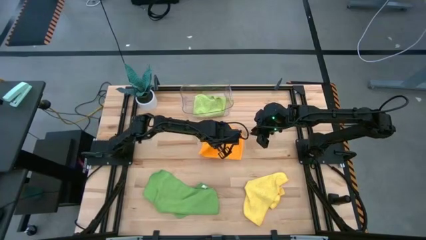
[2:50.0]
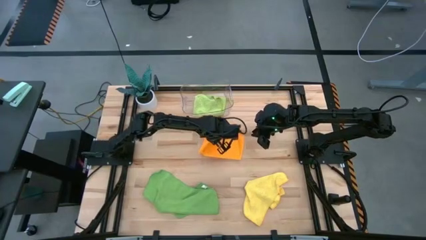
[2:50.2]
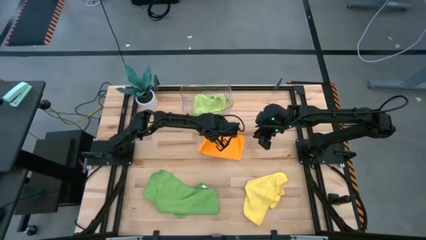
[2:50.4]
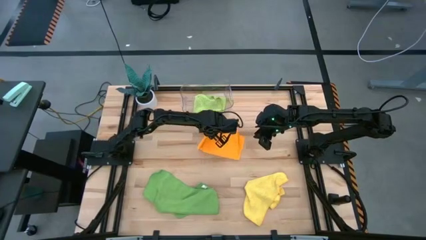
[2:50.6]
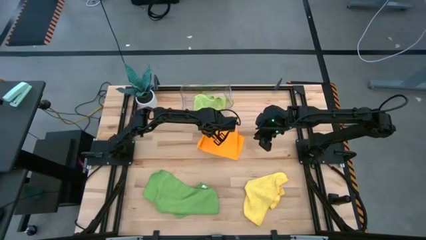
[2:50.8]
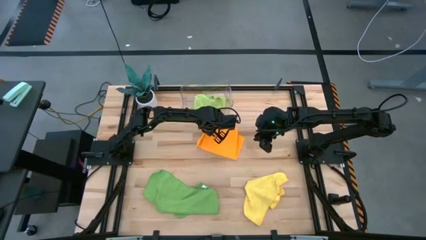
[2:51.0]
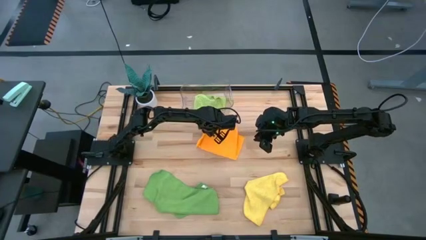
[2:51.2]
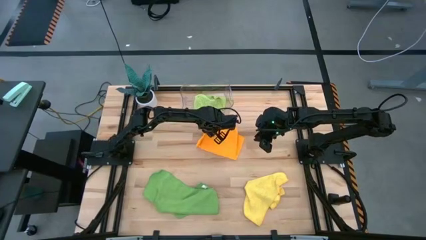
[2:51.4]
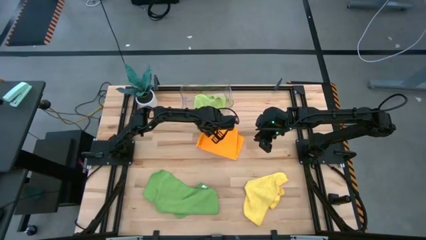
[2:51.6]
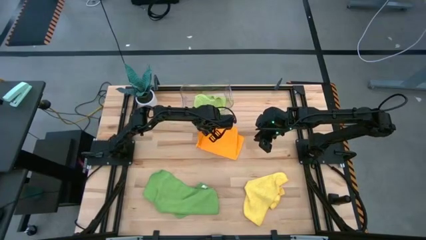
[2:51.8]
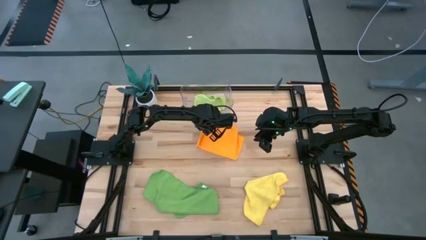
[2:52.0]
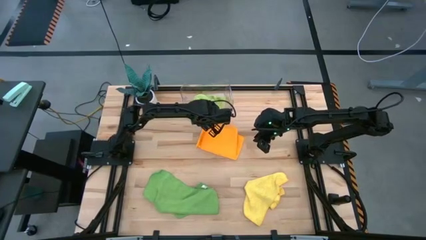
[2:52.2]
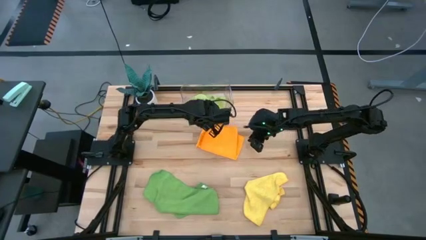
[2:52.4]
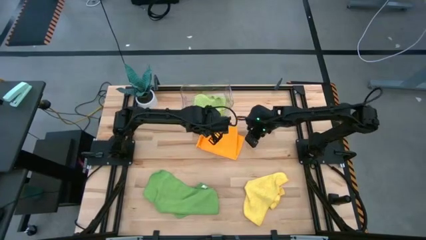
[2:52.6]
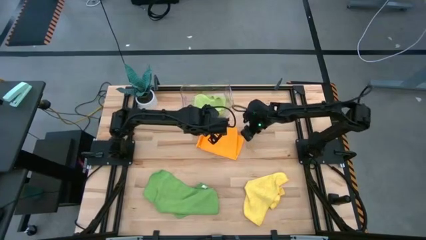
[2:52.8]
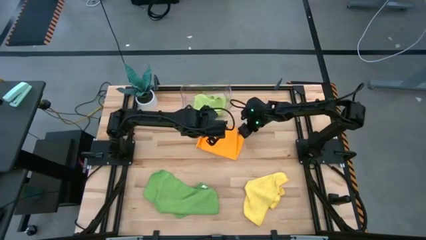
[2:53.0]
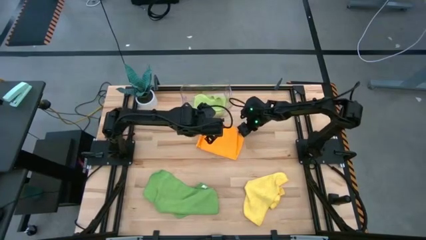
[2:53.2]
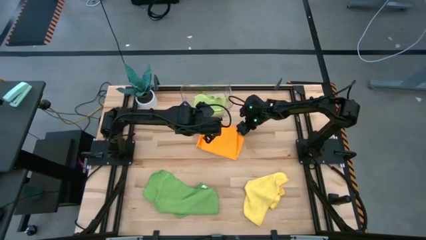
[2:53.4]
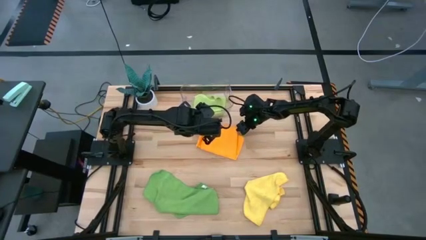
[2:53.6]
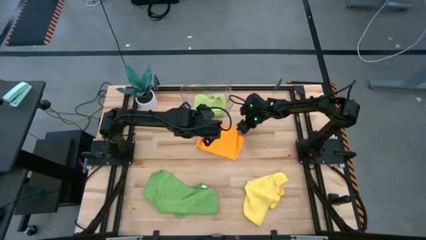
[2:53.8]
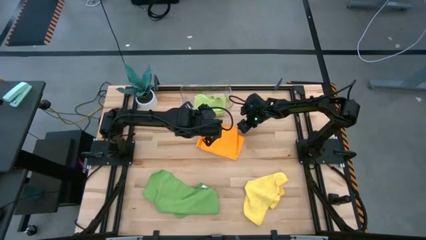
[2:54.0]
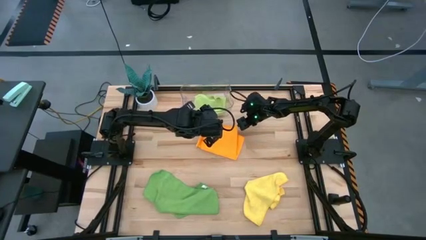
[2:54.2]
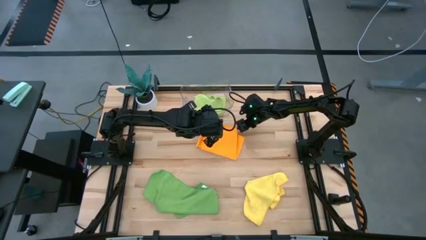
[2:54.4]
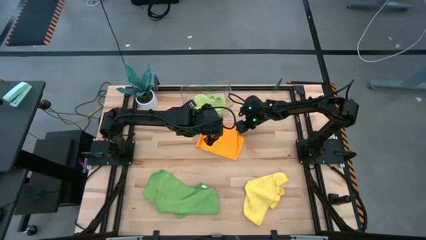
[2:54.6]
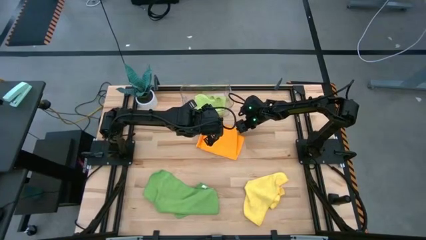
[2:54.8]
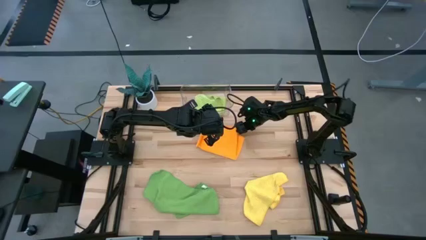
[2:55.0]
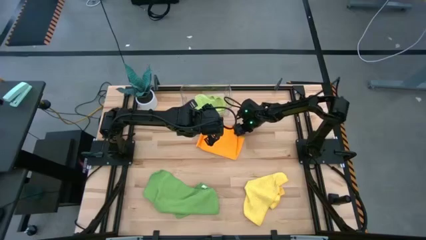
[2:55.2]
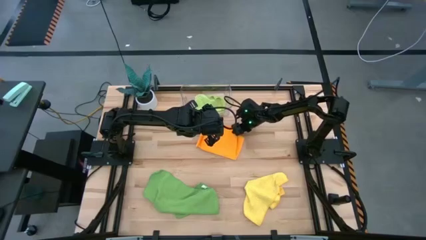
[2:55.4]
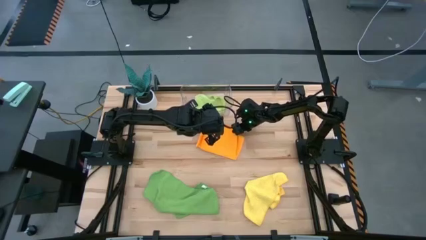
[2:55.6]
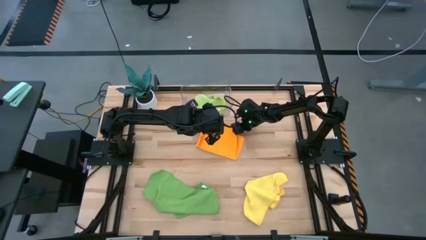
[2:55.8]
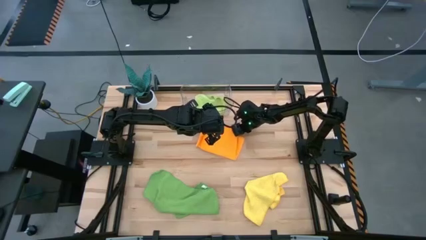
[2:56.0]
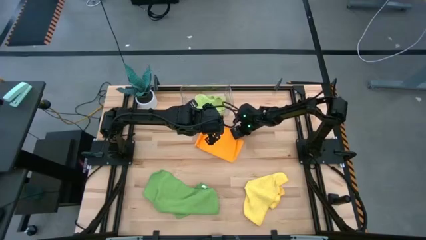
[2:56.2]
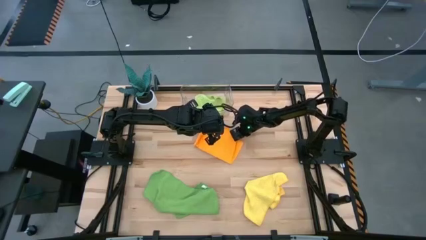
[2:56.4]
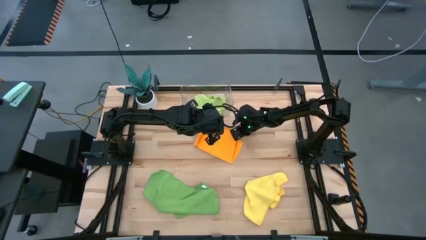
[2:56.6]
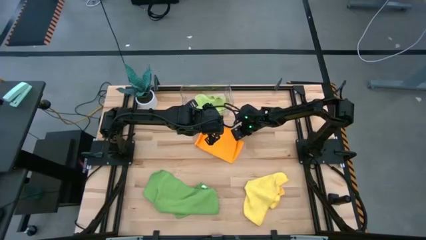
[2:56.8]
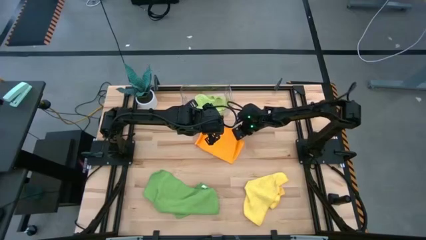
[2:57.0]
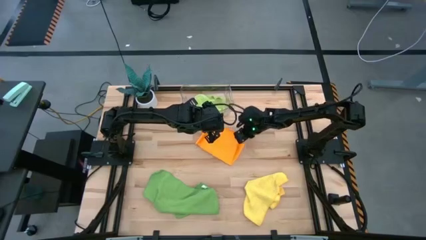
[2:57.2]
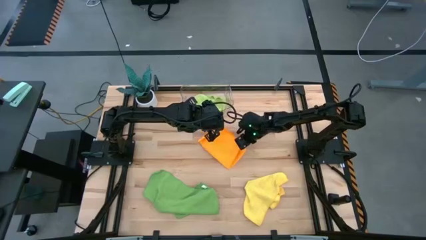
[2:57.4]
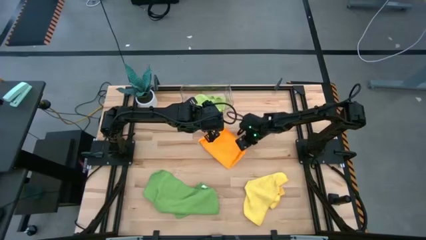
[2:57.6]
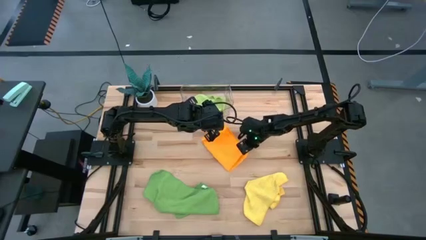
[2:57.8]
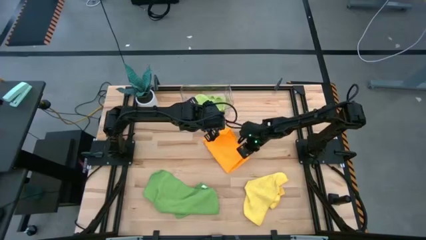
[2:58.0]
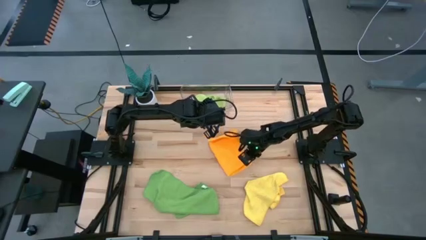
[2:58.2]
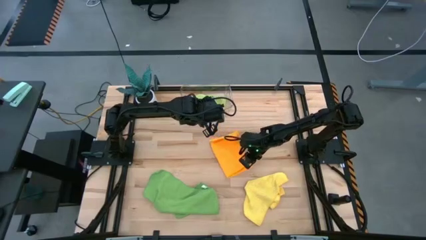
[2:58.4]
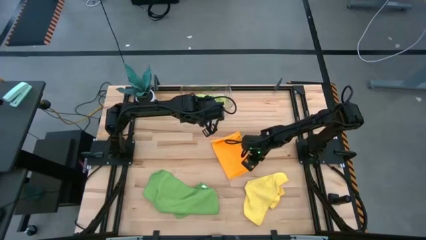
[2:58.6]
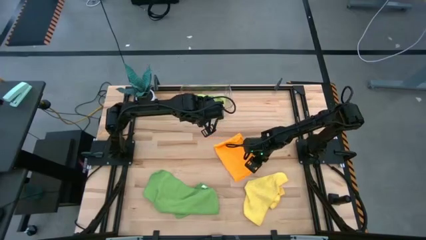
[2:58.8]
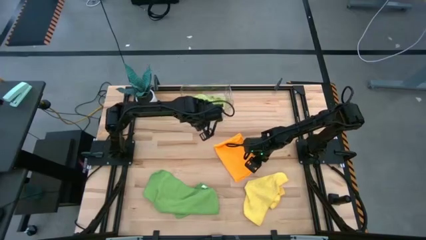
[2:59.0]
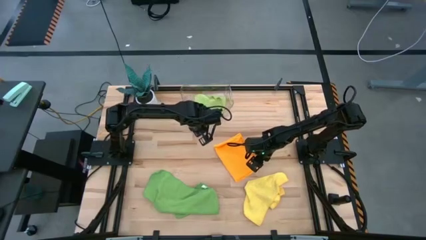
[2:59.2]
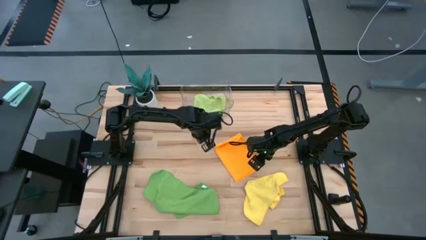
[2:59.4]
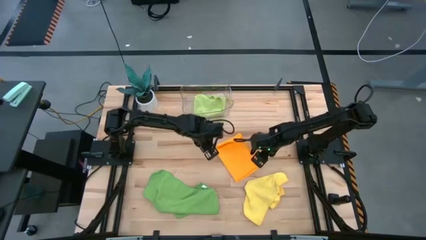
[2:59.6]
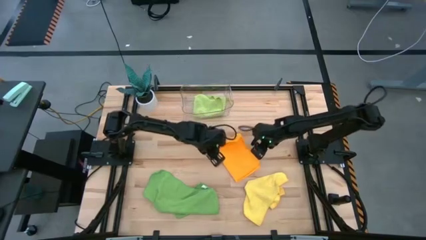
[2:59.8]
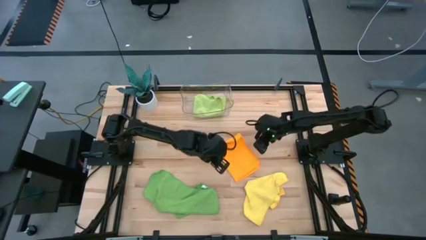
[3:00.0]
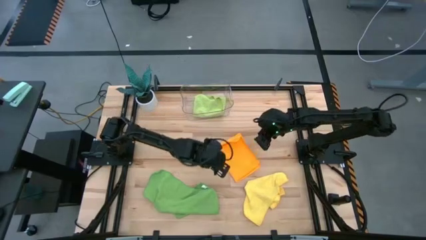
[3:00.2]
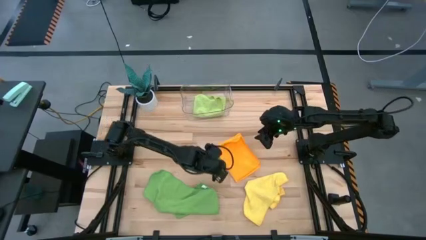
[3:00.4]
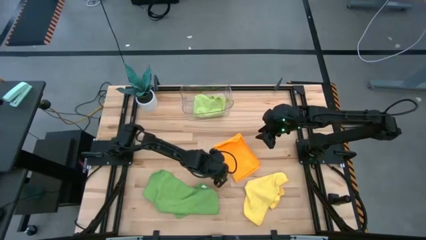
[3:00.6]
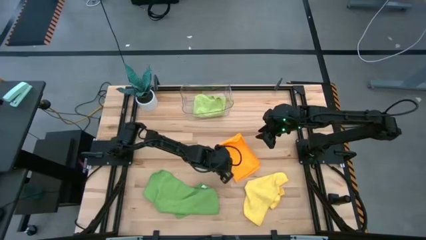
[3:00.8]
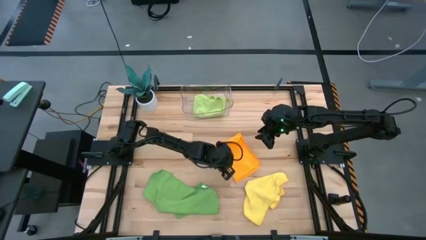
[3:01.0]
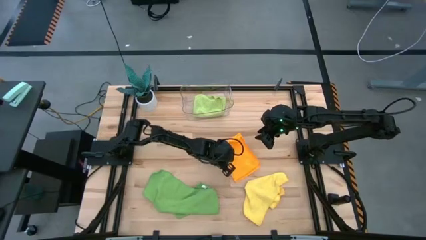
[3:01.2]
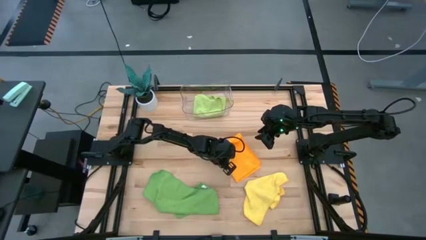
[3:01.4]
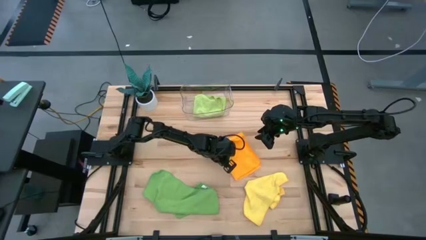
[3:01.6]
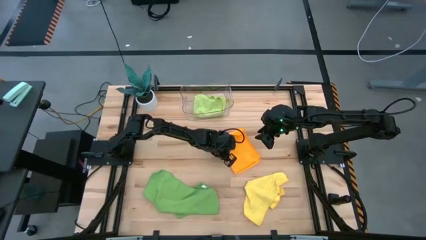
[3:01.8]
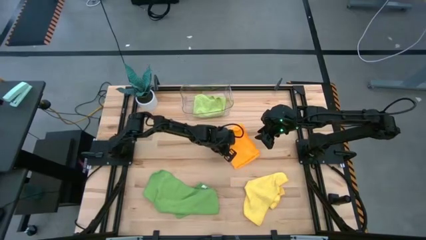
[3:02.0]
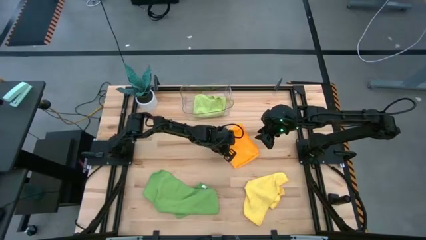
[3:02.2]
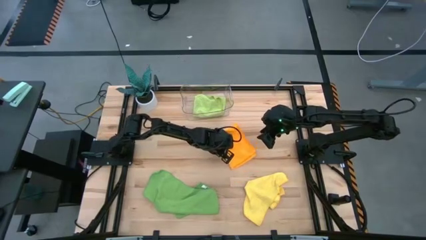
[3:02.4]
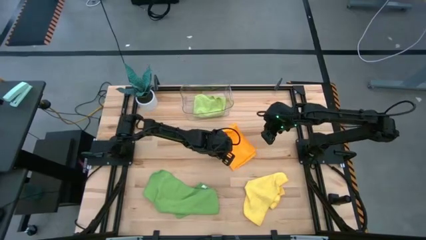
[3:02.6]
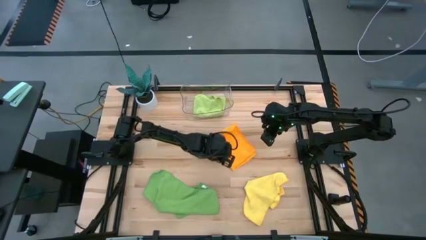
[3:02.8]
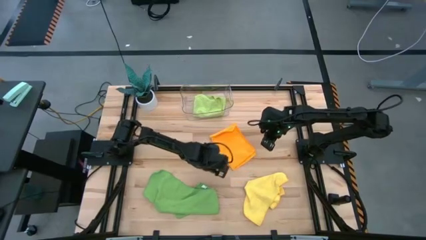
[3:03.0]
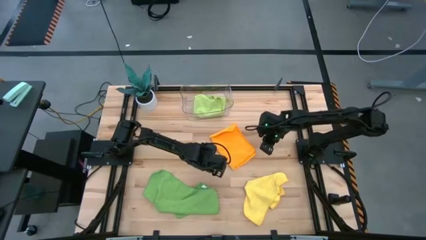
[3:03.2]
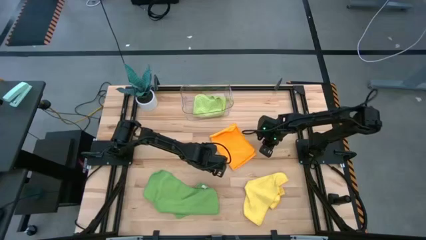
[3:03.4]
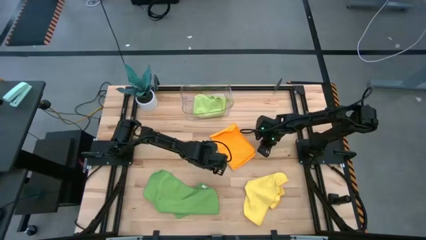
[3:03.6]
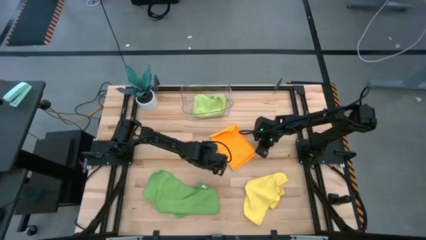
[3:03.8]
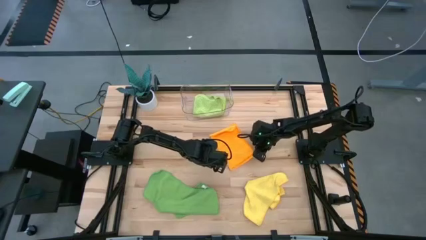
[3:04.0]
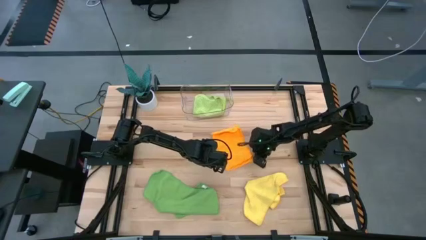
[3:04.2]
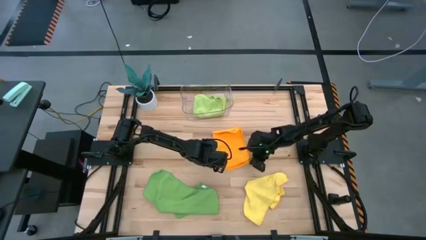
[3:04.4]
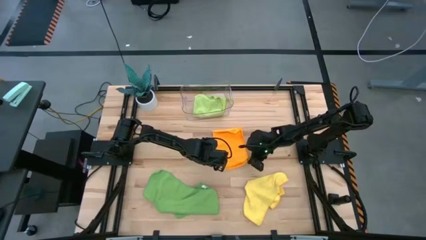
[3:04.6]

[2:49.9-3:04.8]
Task: Fold microfiber towels
Fold the orange microfiber cloth
